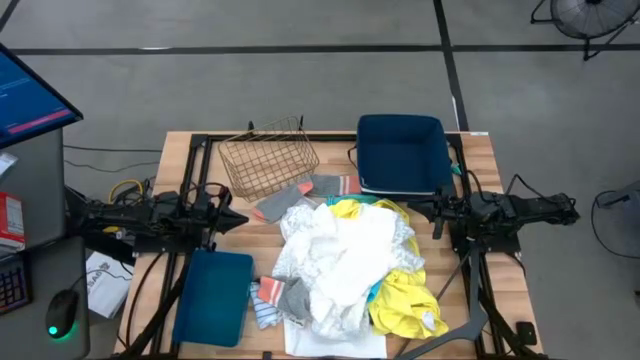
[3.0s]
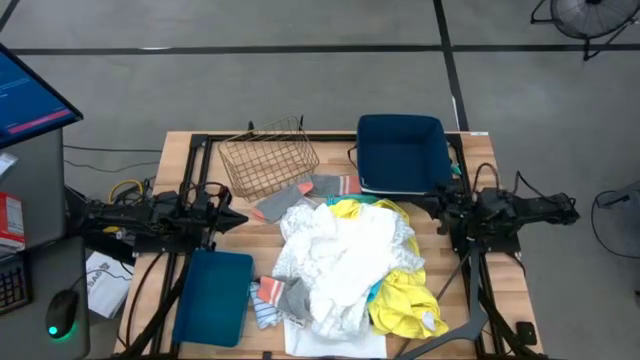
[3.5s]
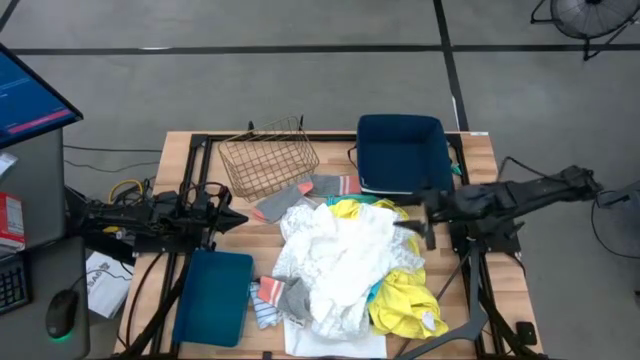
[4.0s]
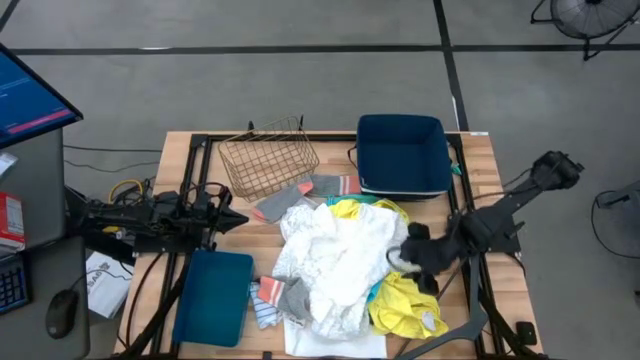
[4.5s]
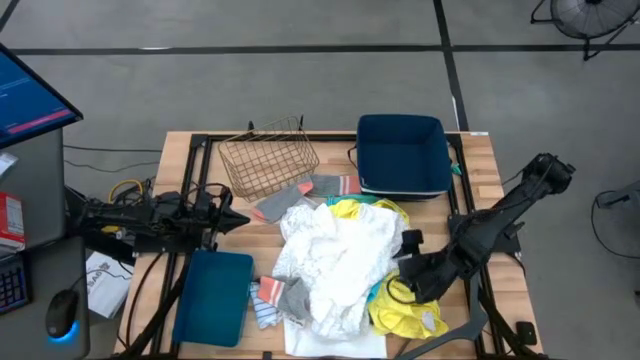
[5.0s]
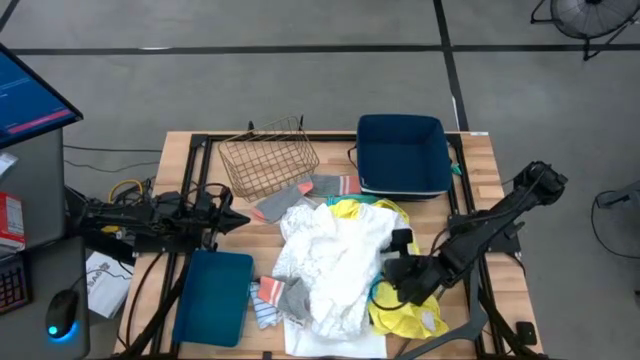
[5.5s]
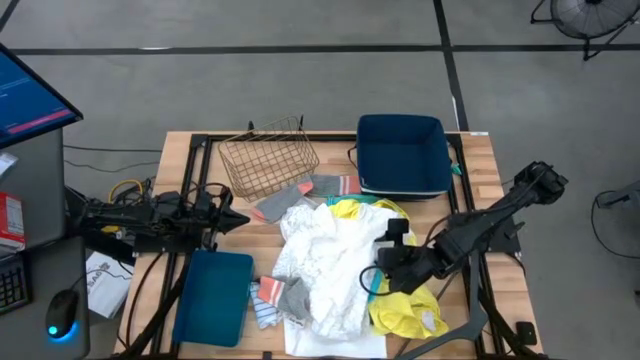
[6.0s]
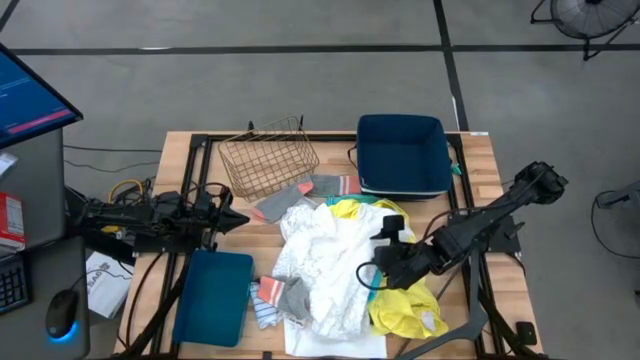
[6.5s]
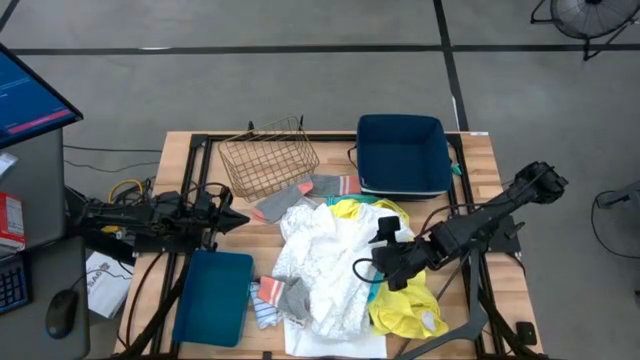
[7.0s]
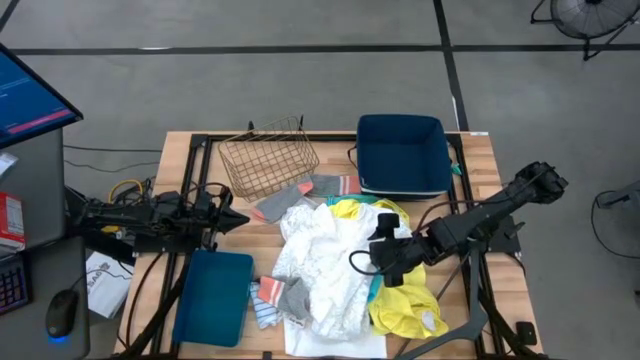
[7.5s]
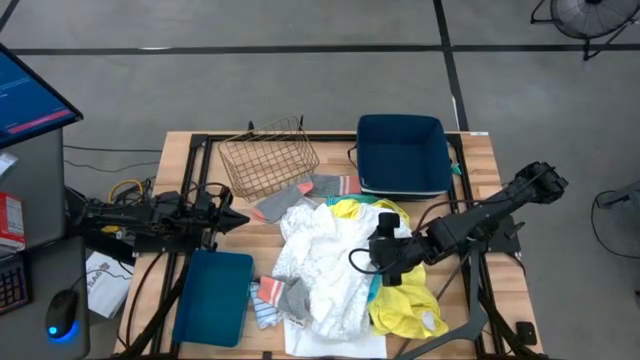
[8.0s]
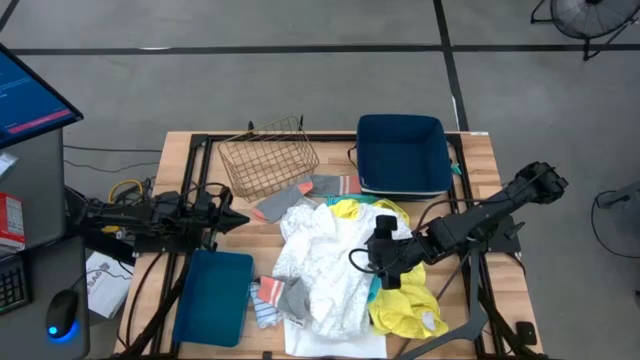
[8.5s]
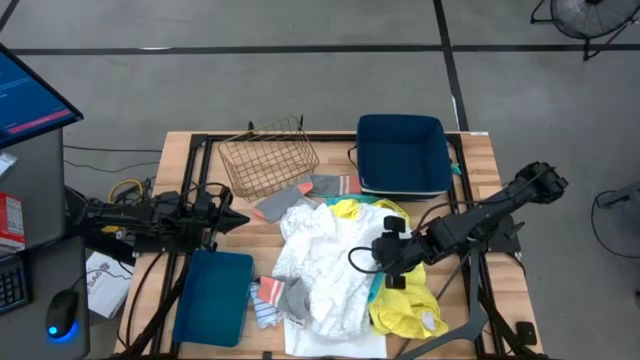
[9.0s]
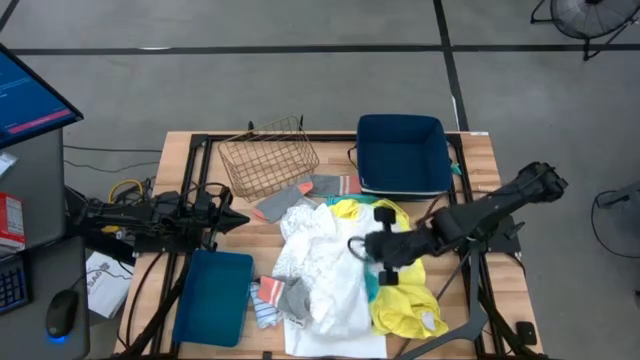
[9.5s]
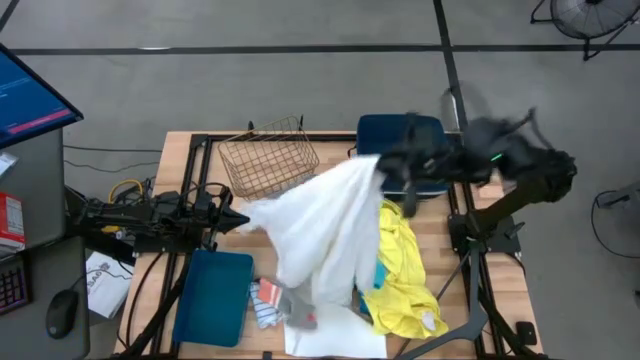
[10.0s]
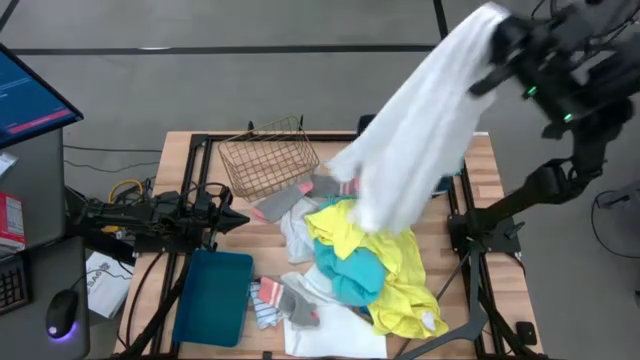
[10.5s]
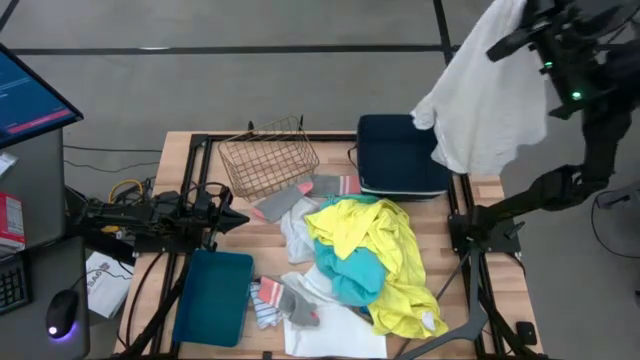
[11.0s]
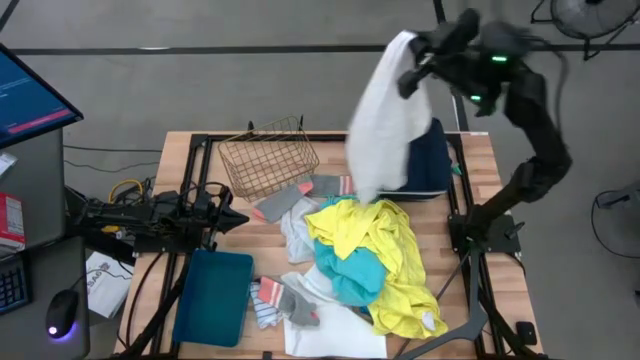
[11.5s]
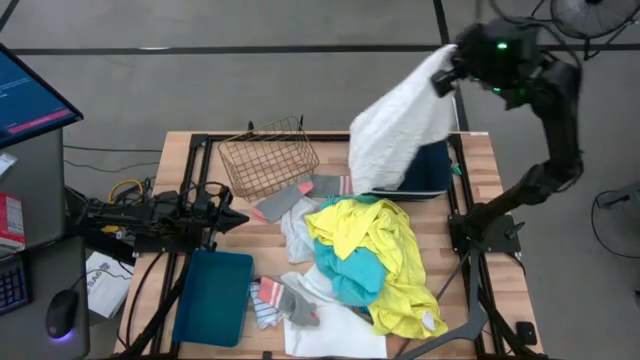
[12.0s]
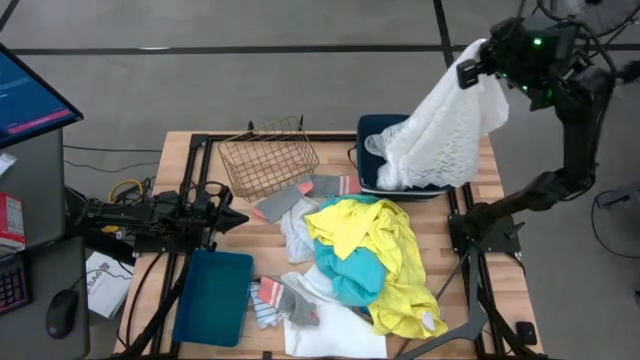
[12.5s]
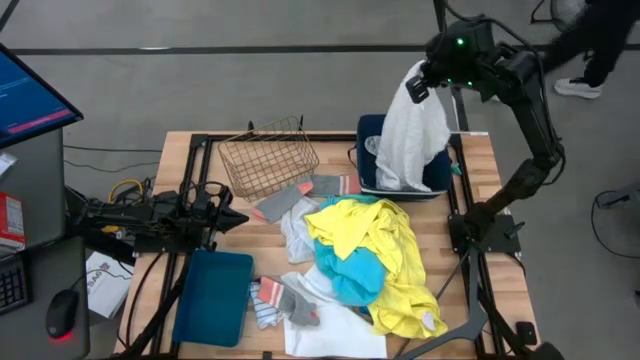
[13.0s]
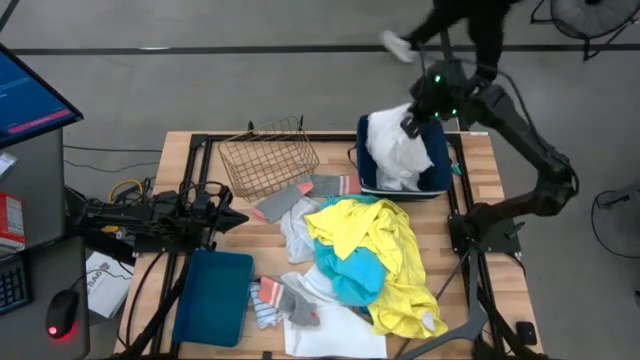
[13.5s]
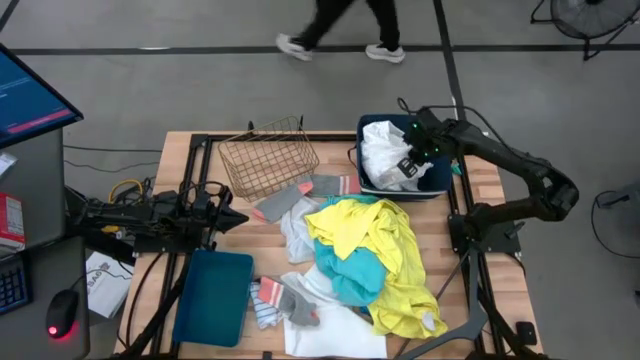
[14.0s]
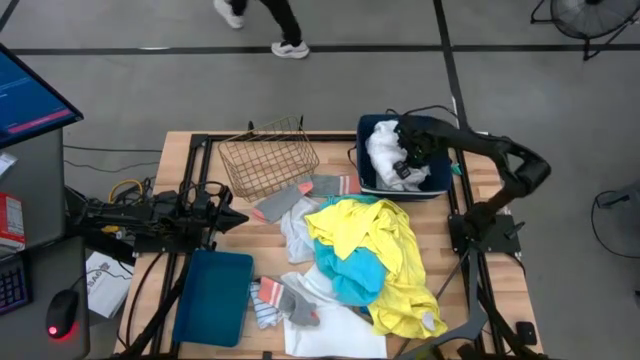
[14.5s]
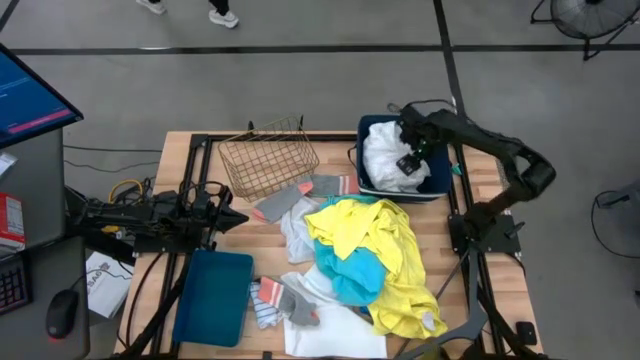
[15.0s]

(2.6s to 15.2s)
Task: Pick & Place Cloths
Put the white shirt into the dark blue bin

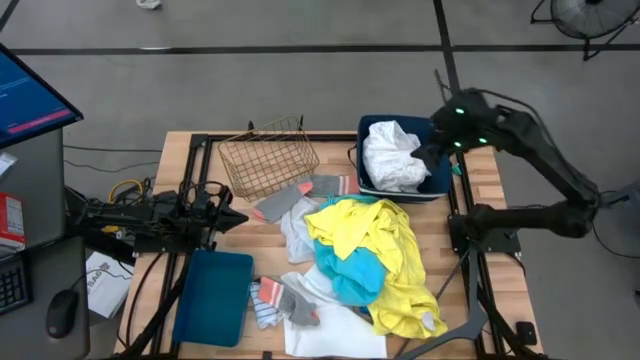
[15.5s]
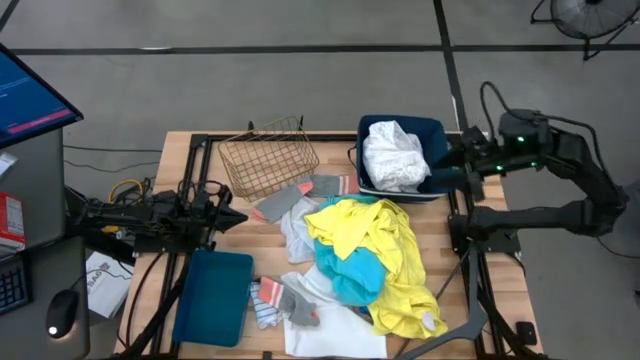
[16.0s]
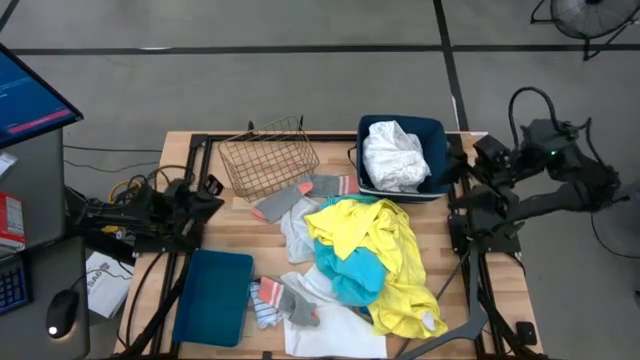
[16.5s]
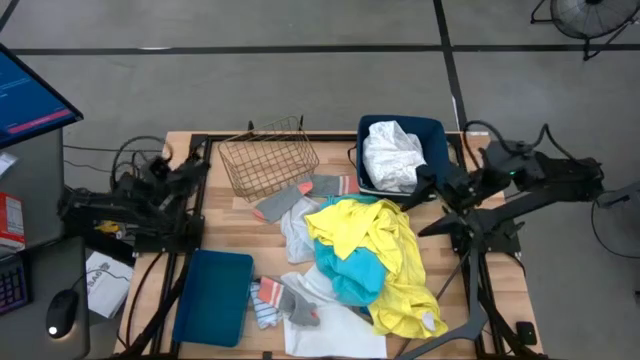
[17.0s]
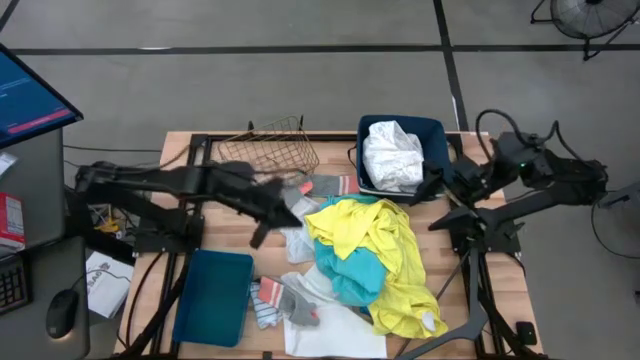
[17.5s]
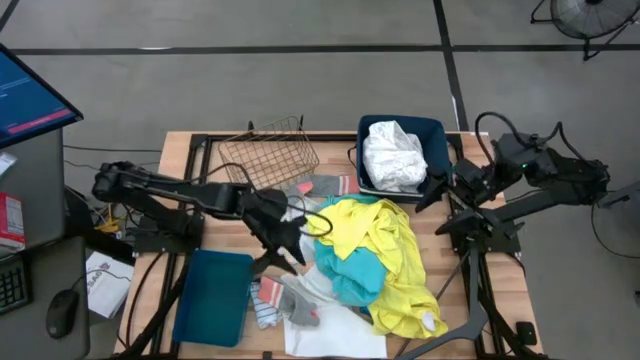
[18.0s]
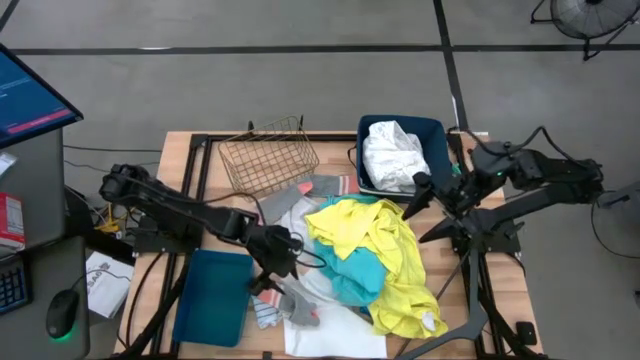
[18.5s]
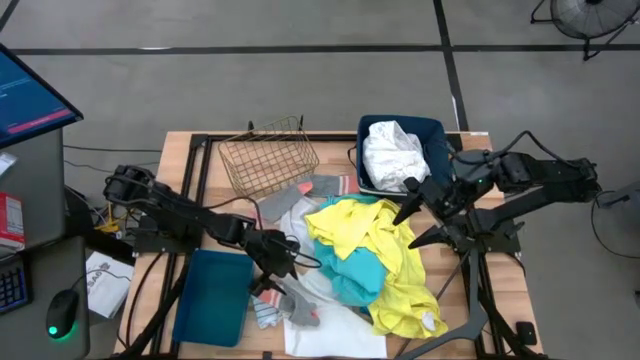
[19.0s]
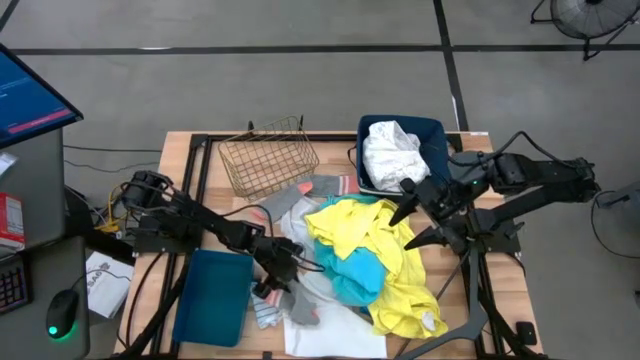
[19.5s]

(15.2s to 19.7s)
Put the gray sock into the blue bin

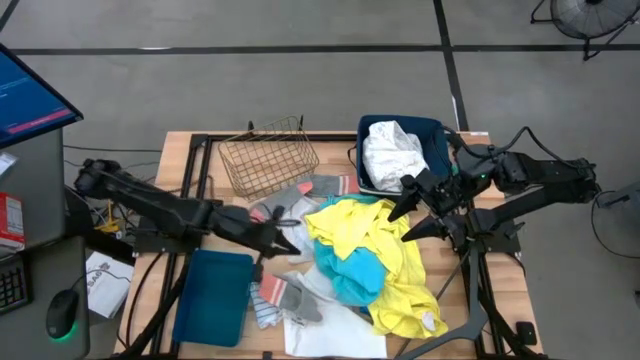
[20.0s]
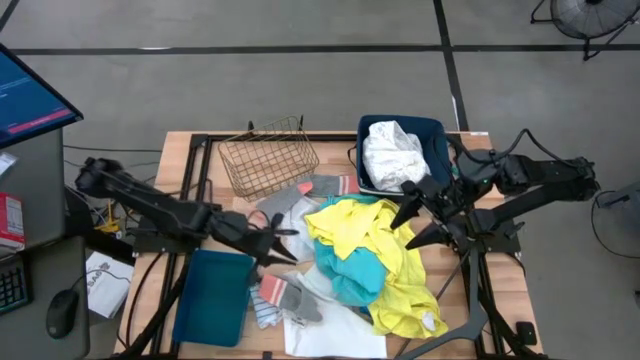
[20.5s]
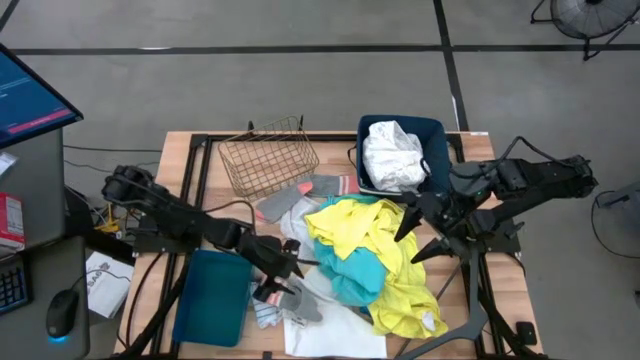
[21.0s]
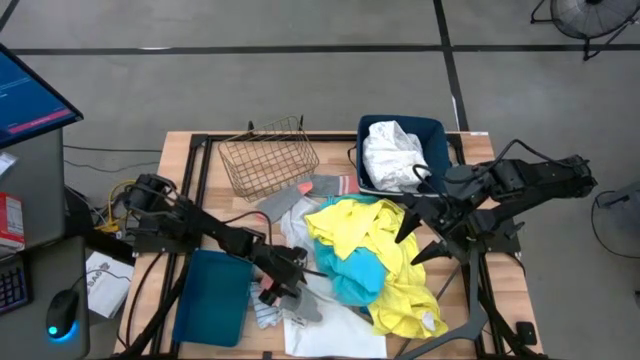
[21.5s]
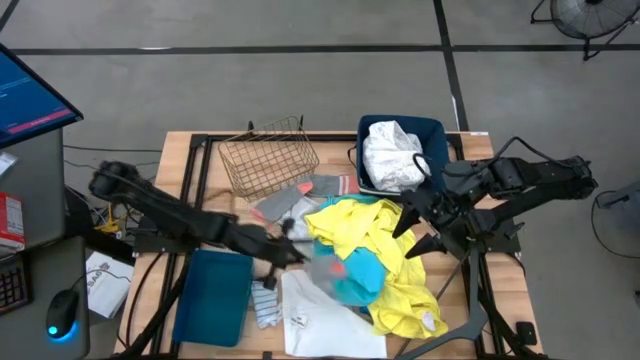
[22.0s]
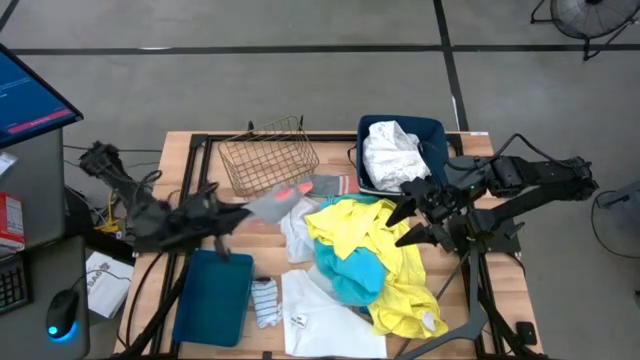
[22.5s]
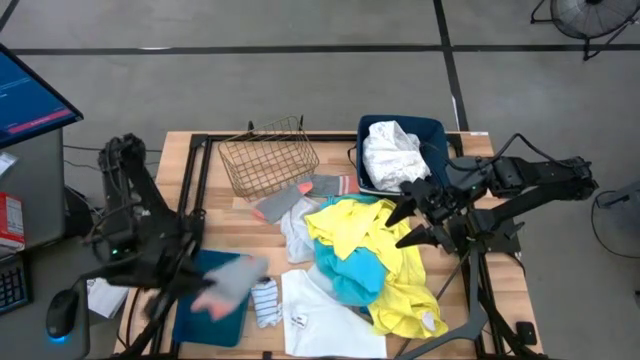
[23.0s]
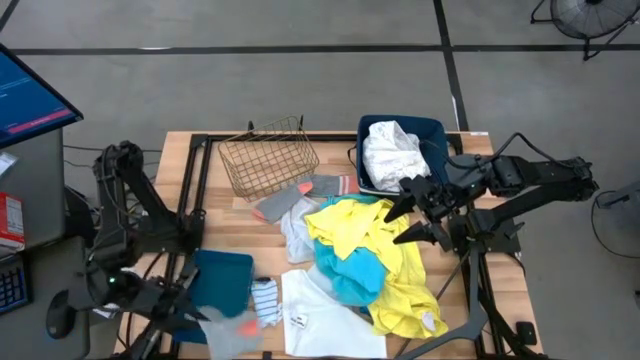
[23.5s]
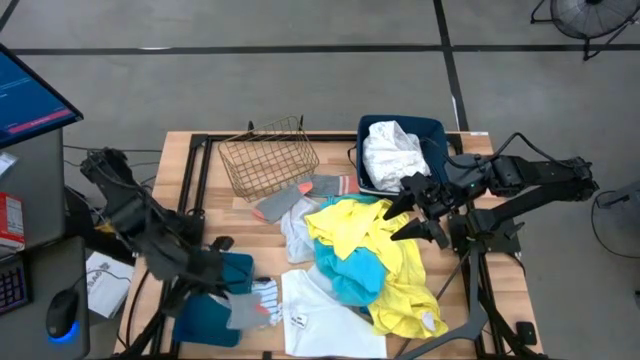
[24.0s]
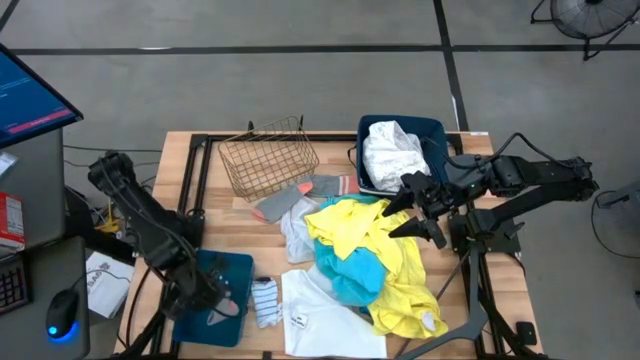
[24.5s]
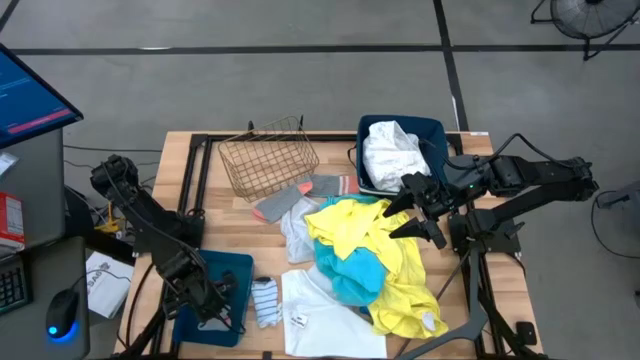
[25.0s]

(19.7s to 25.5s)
Put the gray sock into the blue bin
